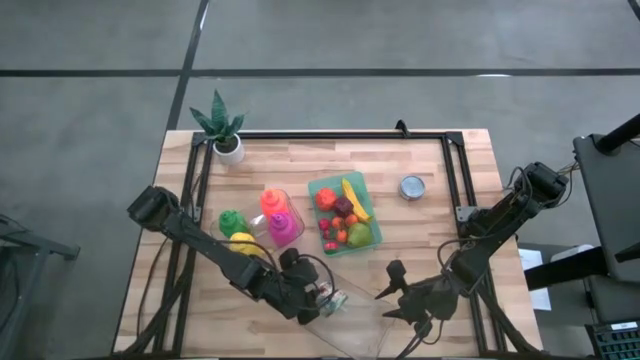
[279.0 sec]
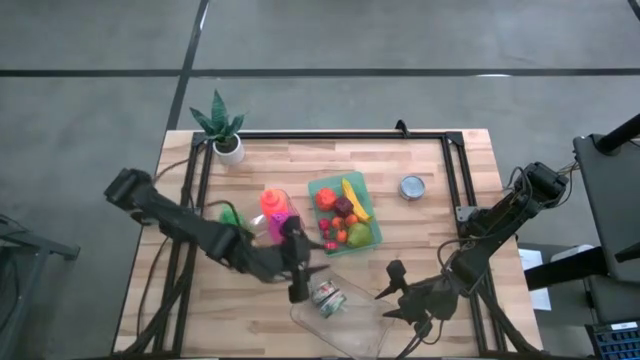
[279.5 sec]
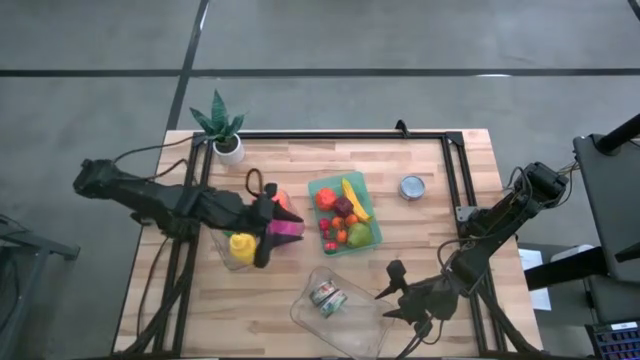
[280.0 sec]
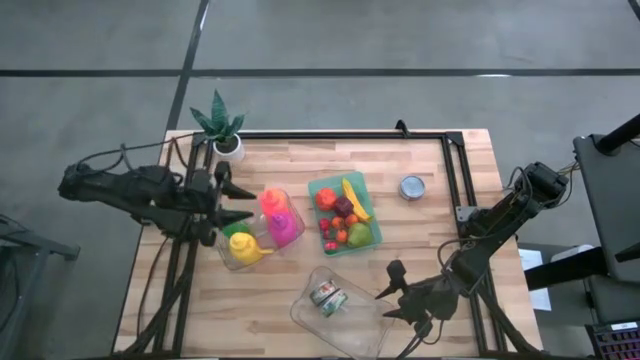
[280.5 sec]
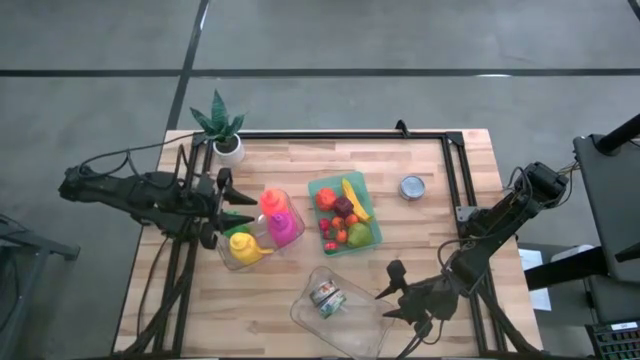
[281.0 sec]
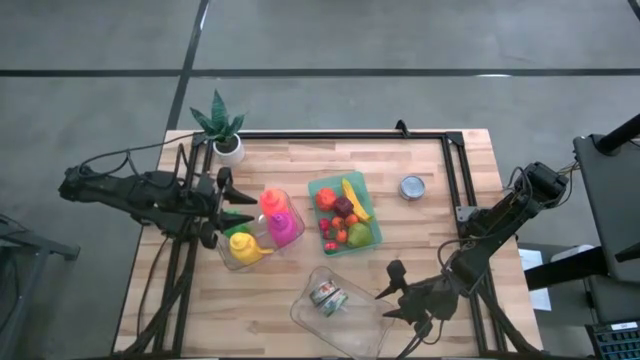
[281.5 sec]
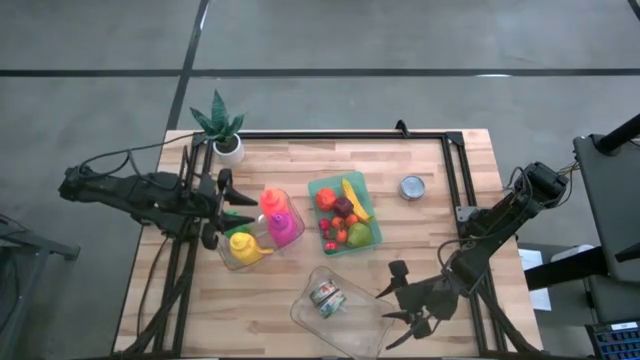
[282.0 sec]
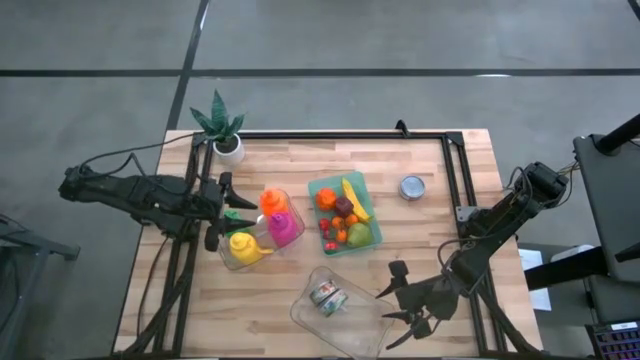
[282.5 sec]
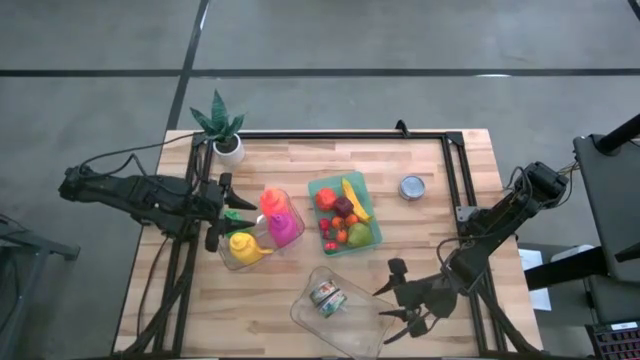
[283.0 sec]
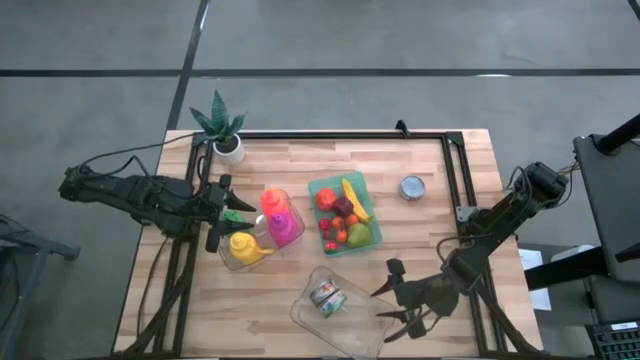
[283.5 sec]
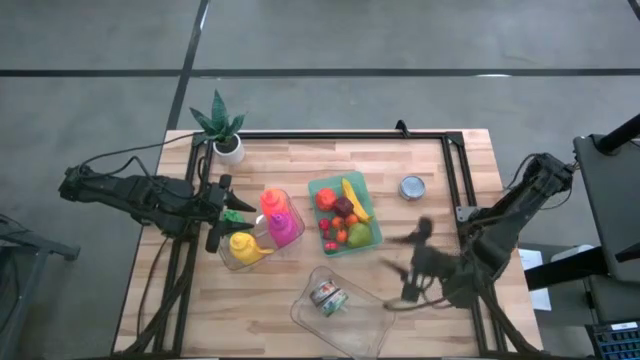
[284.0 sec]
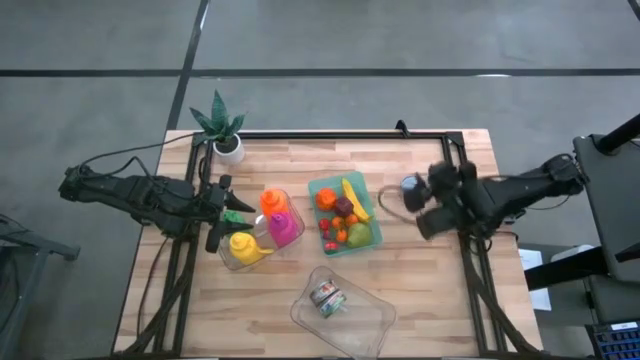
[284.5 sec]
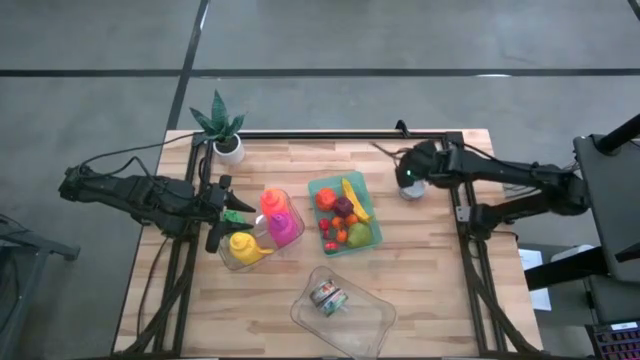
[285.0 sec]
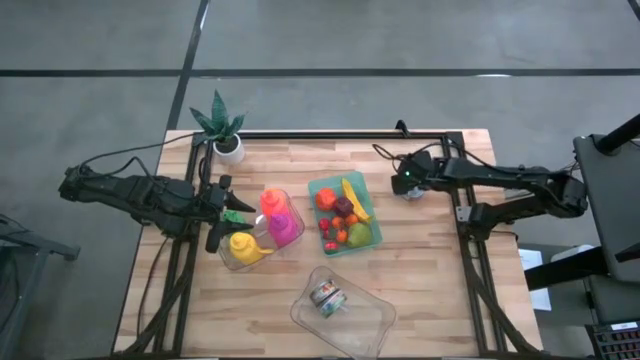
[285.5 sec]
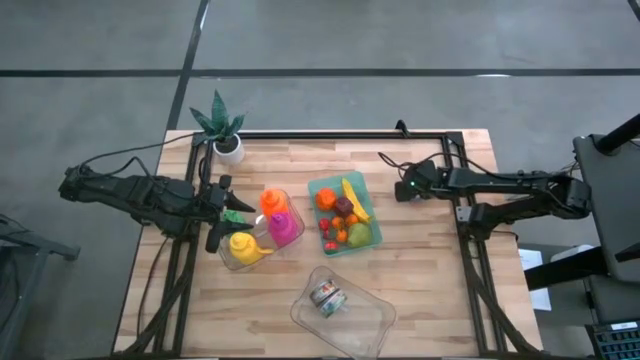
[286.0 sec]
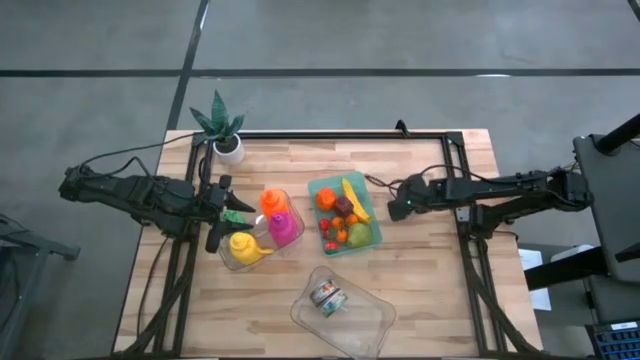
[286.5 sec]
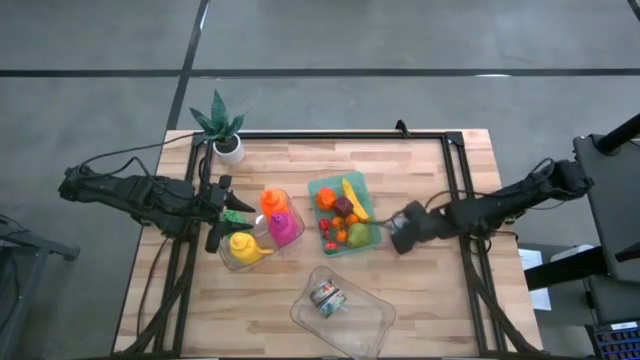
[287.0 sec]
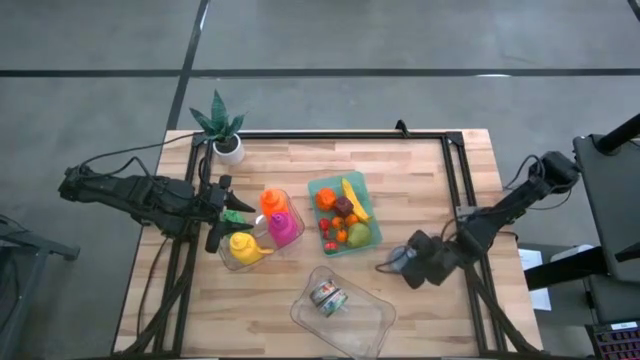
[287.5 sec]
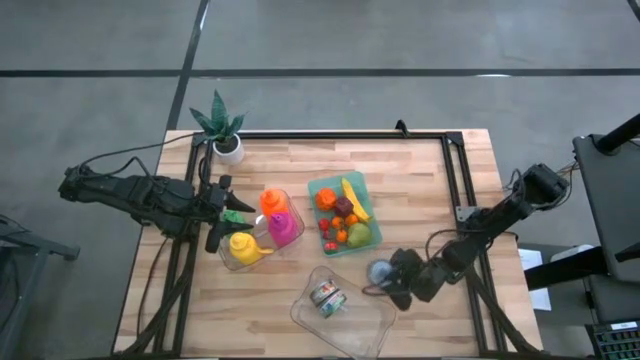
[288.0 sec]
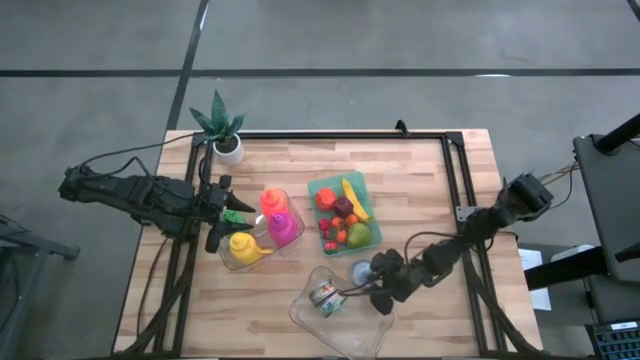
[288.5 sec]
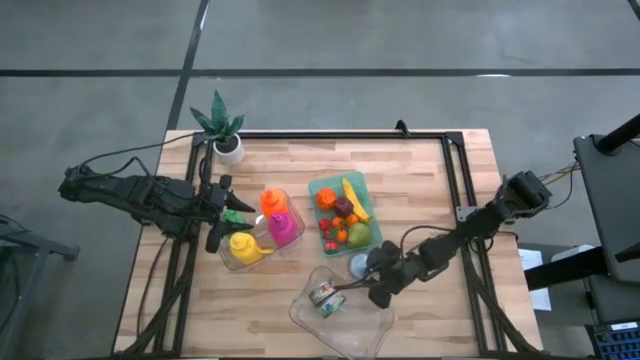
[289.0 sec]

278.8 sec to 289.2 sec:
Task: Pick & Place Food Item
Move the red tuna to the middle of the table

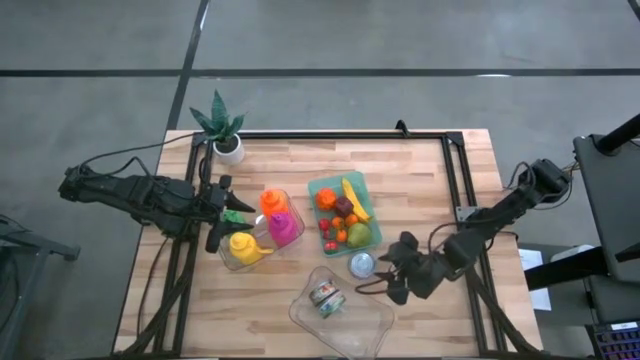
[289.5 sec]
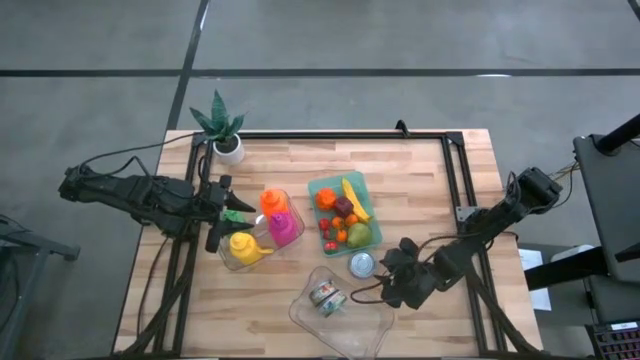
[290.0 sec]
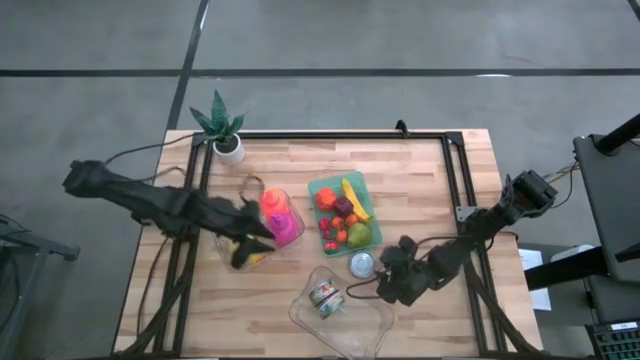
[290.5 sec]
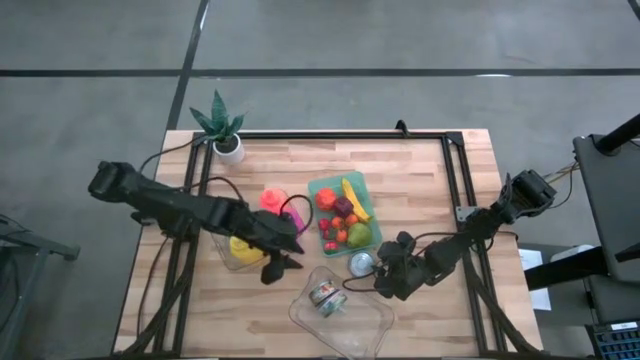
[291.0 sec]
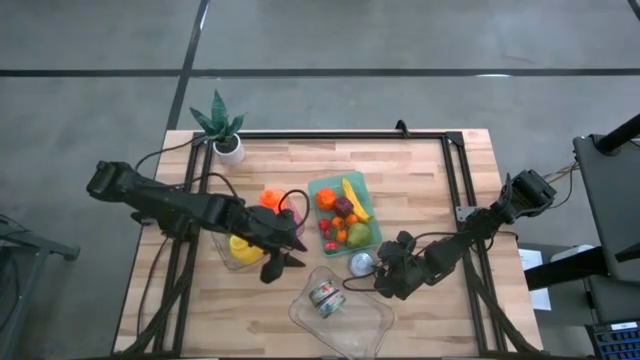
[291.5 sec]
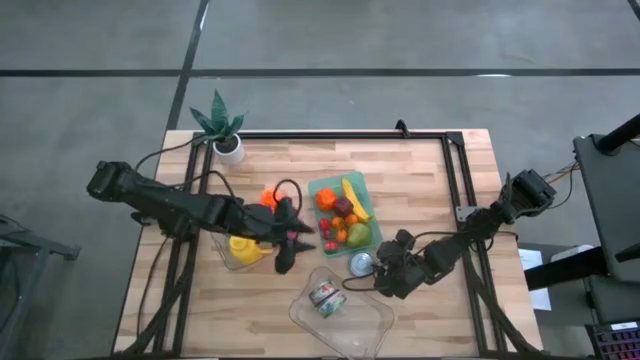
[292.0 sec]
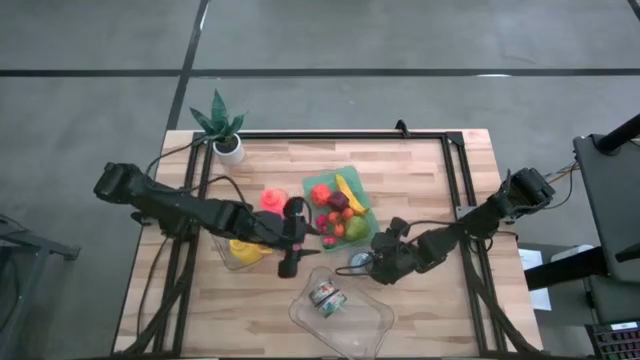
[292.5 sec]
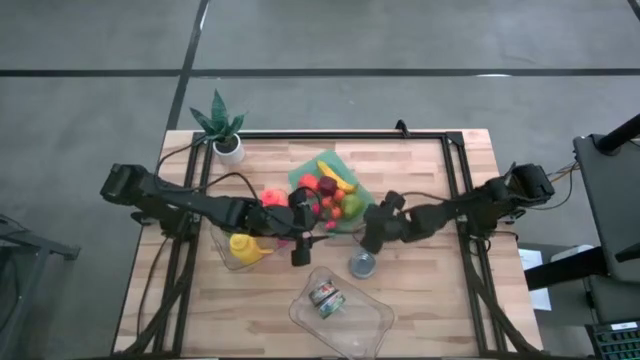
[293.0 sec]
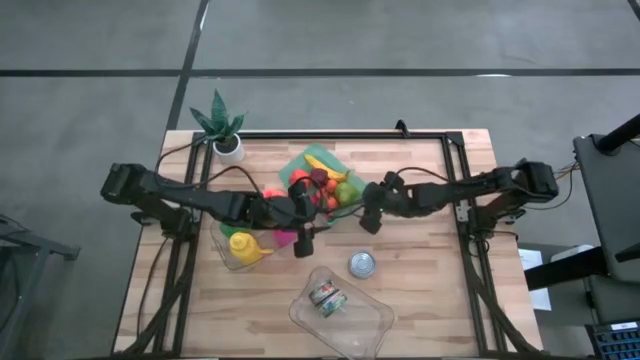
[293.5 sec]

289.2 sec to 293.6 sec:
Adjust the green bin

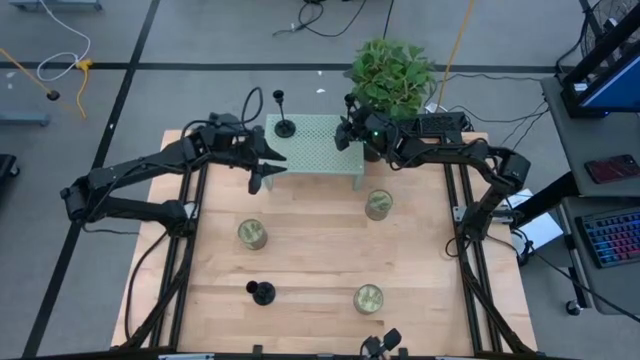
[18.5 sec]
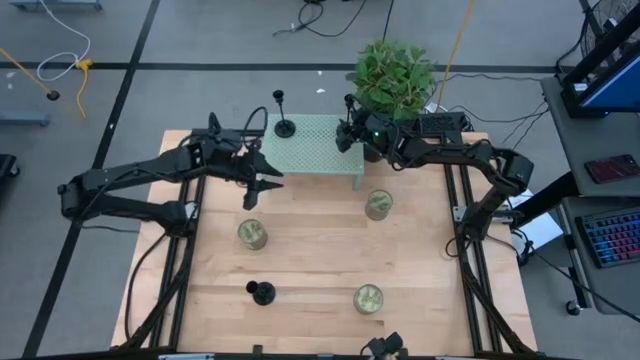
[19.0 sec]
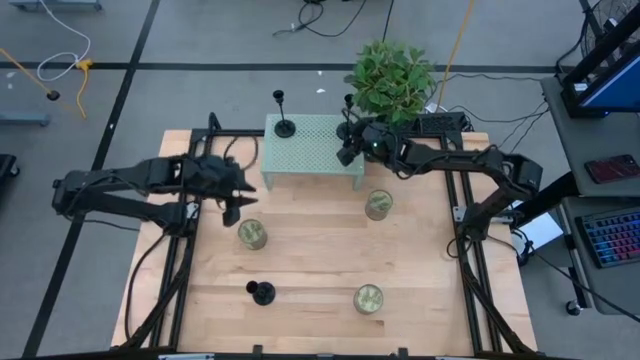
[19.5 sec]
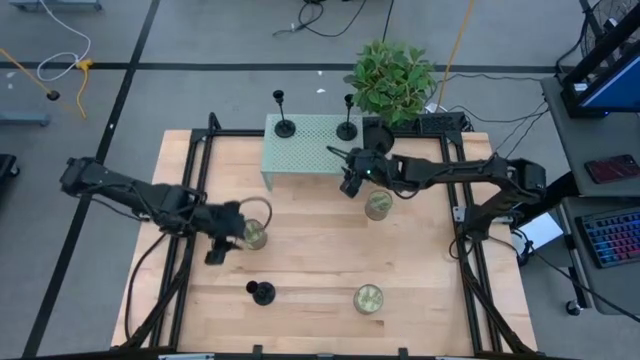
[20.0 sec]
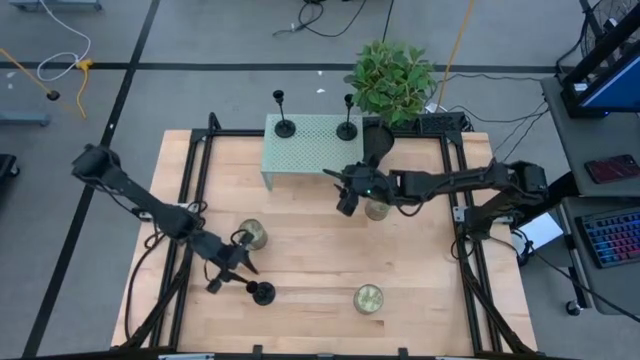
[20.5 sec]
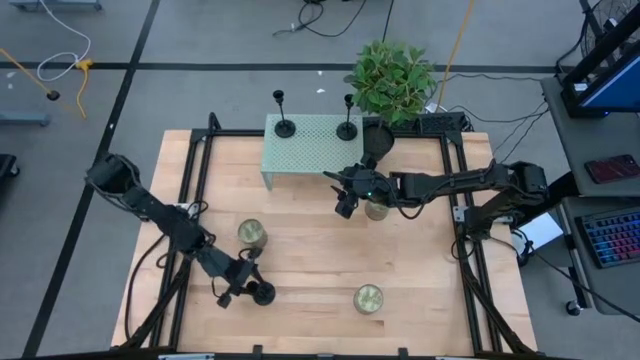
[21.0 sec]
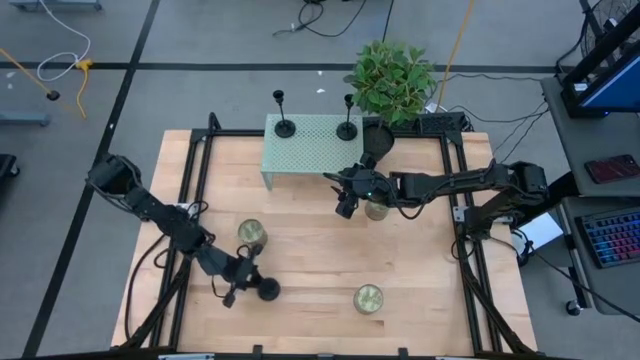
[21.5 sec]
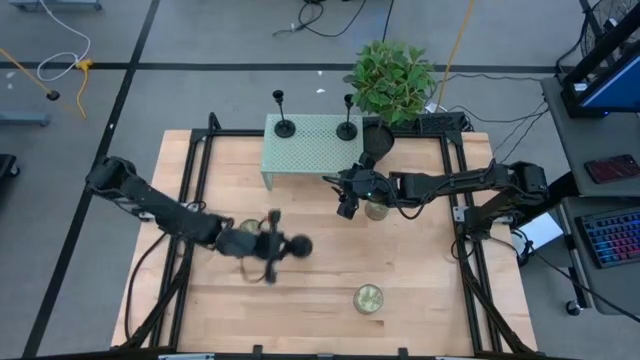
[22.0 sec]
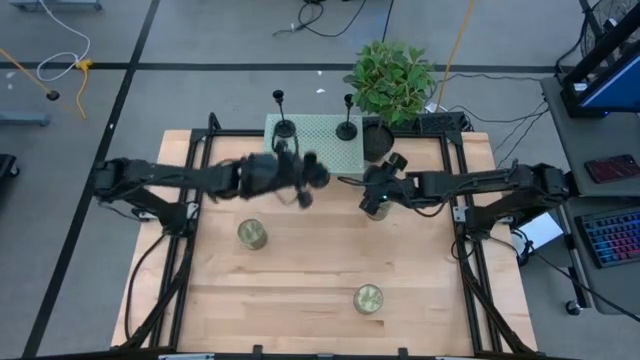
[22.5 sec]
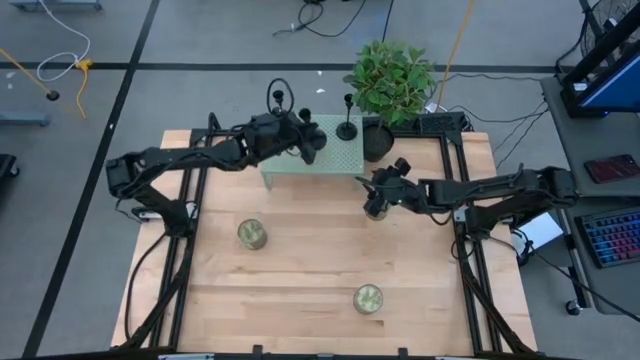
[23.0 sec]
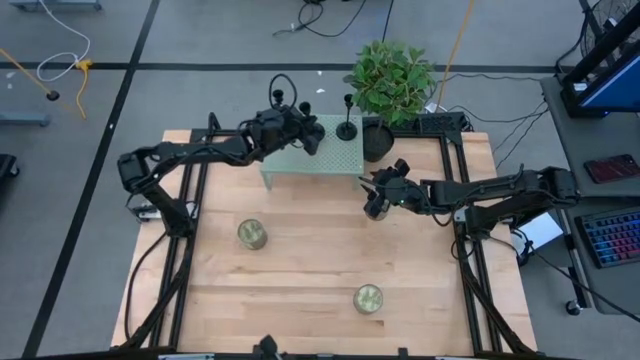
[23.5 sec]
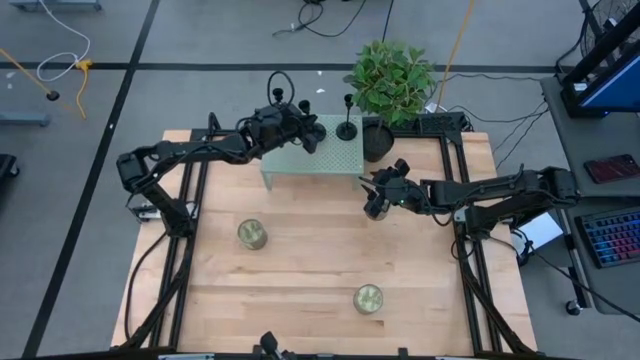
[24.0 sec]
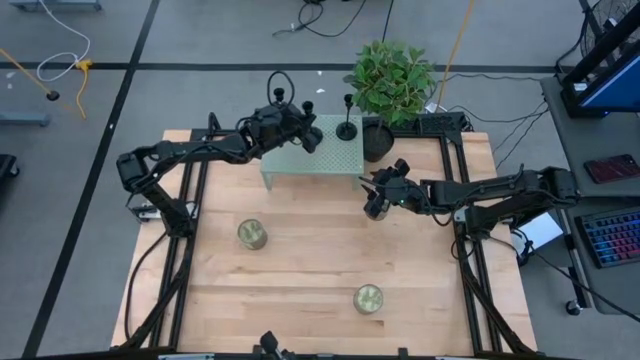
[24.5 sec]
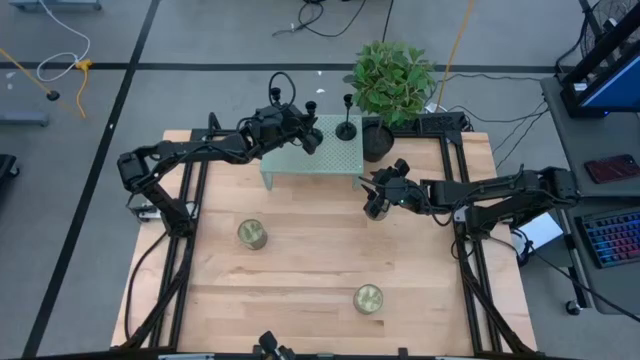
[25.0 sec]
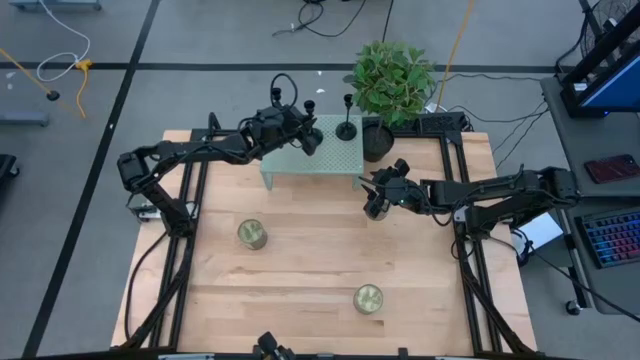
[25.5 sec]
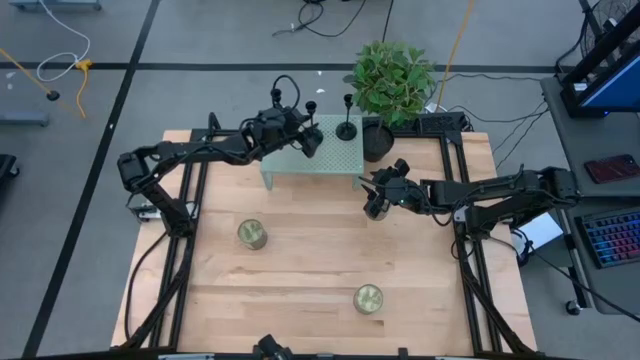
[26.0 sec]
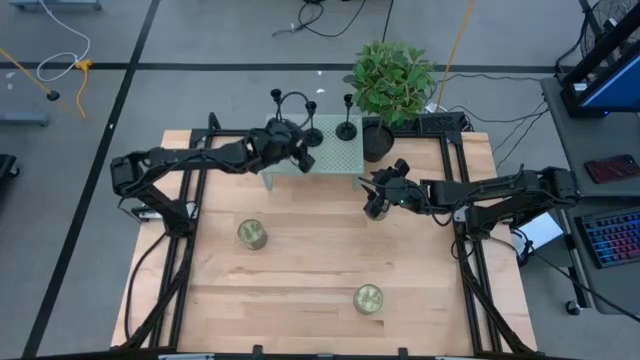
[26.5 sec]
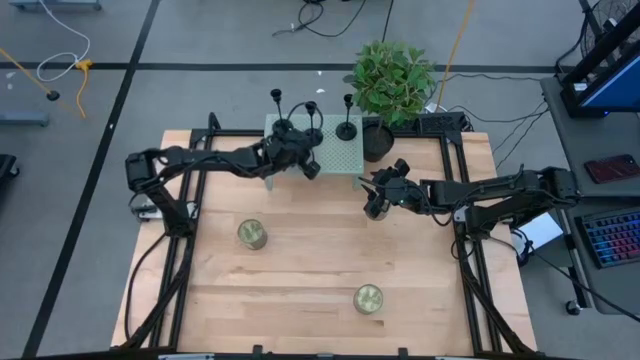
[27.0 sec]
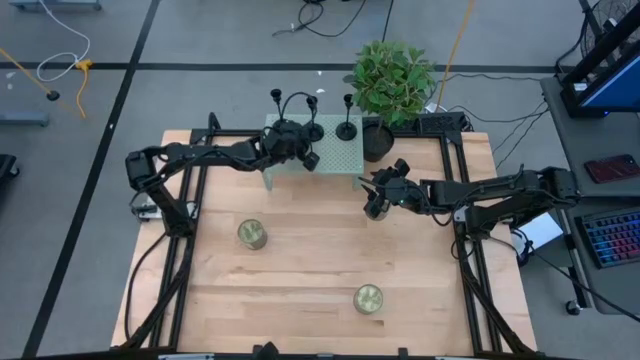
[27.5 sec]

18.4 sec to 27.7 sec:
Task: Pick & Place candle stick holders
Put the candle holder on the shelf
